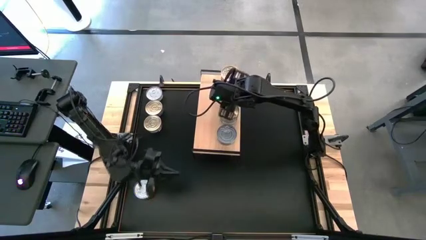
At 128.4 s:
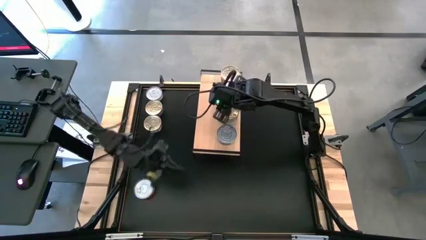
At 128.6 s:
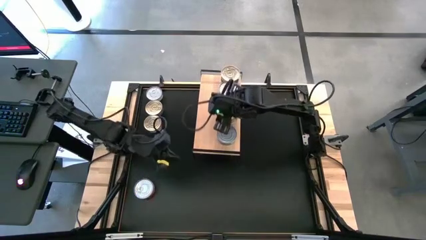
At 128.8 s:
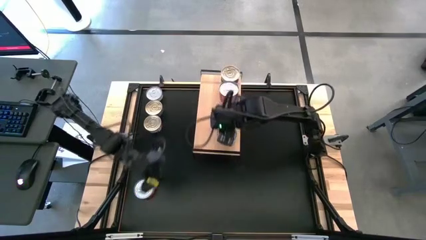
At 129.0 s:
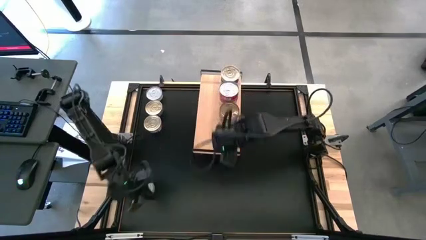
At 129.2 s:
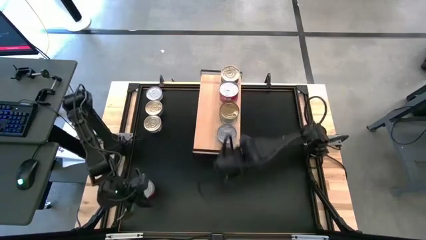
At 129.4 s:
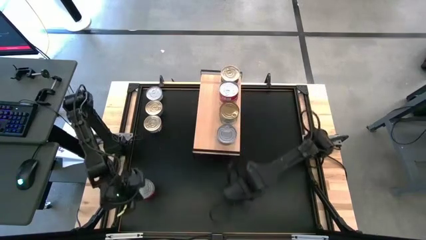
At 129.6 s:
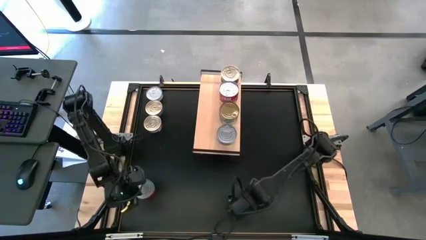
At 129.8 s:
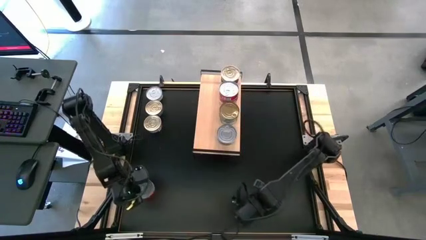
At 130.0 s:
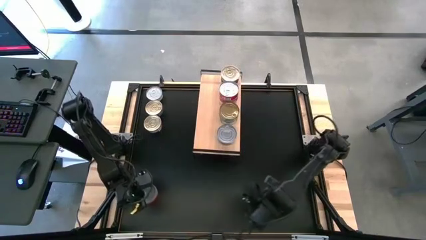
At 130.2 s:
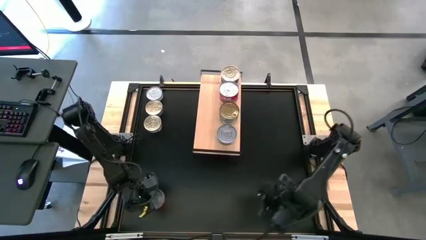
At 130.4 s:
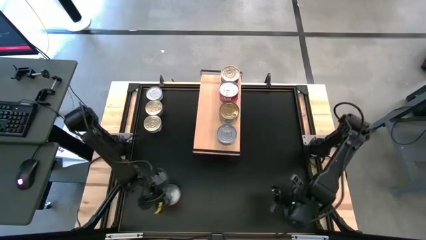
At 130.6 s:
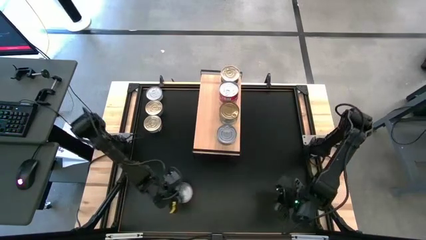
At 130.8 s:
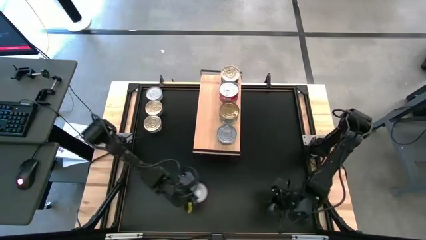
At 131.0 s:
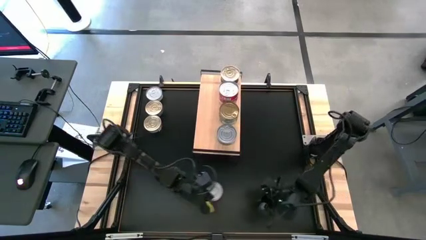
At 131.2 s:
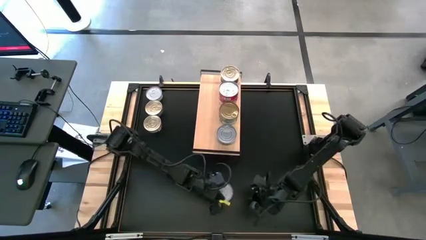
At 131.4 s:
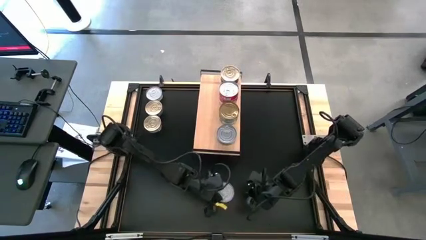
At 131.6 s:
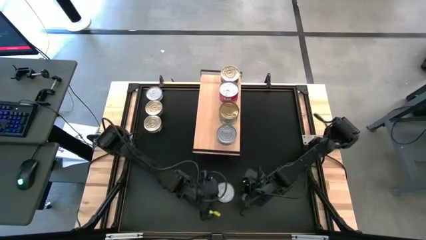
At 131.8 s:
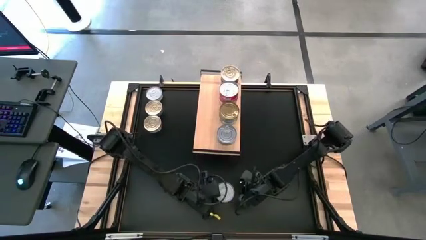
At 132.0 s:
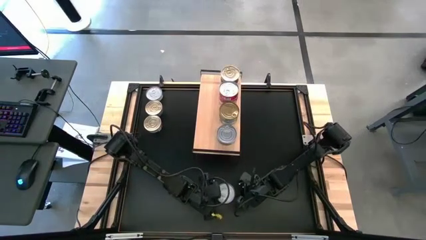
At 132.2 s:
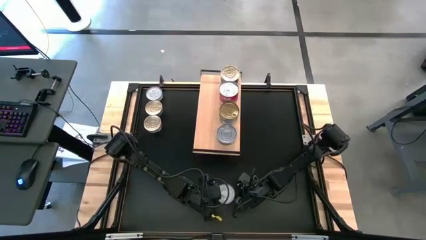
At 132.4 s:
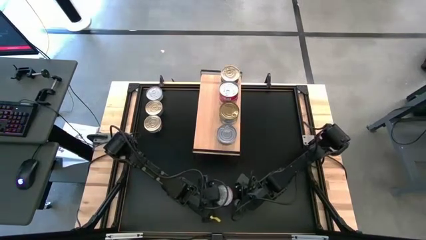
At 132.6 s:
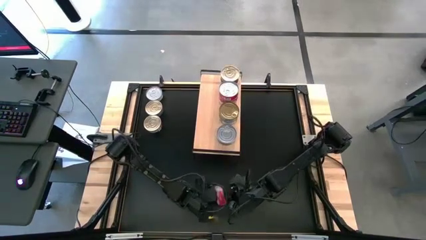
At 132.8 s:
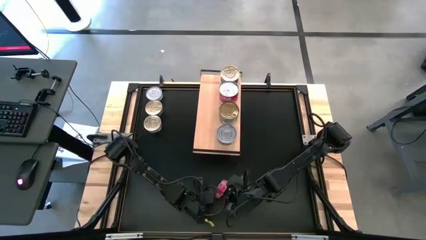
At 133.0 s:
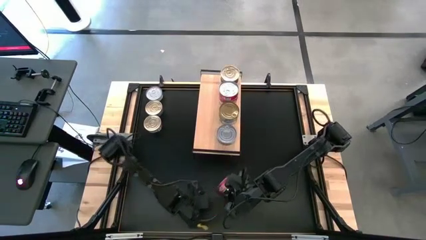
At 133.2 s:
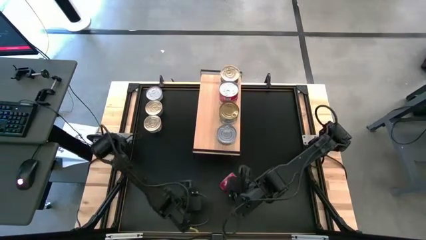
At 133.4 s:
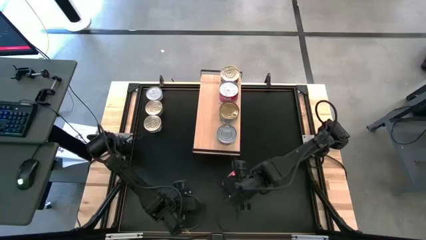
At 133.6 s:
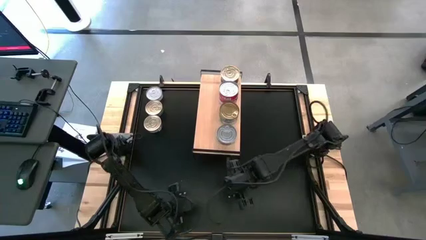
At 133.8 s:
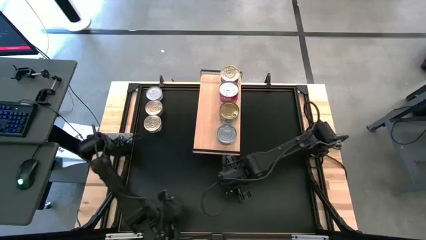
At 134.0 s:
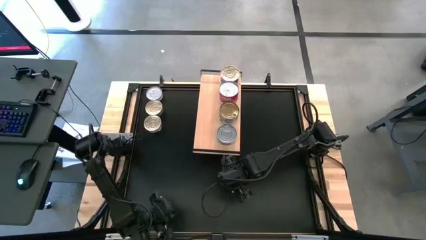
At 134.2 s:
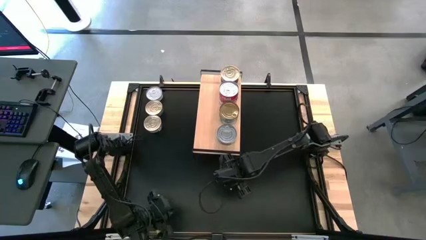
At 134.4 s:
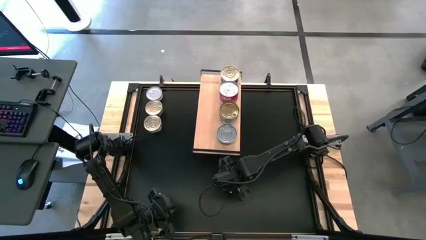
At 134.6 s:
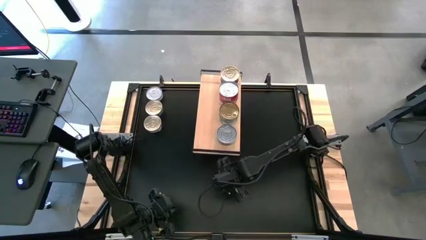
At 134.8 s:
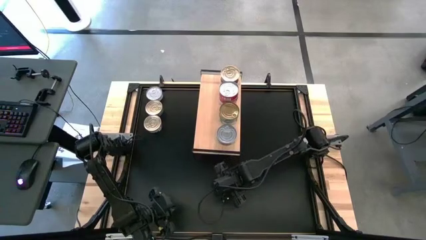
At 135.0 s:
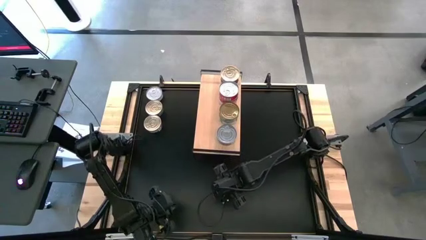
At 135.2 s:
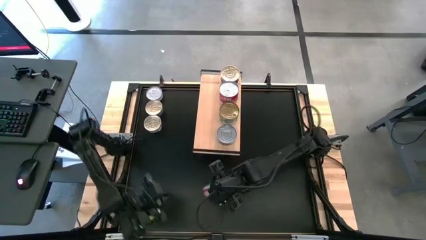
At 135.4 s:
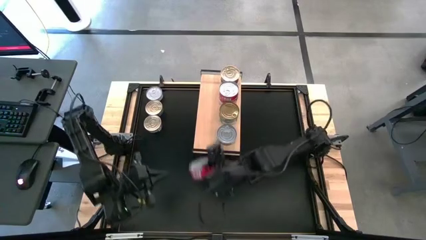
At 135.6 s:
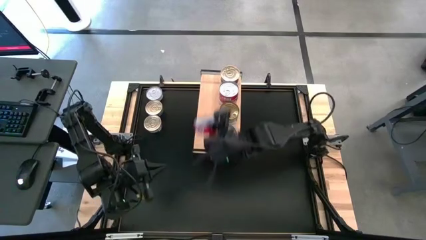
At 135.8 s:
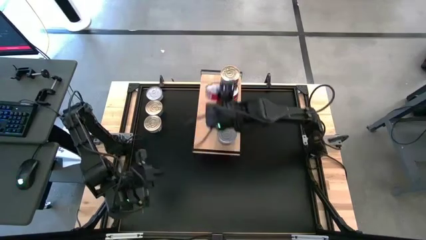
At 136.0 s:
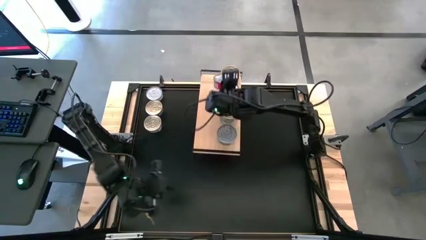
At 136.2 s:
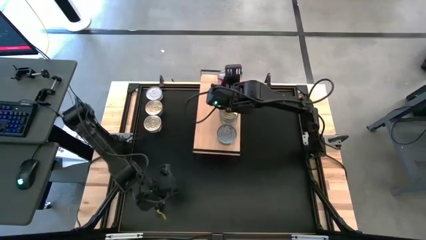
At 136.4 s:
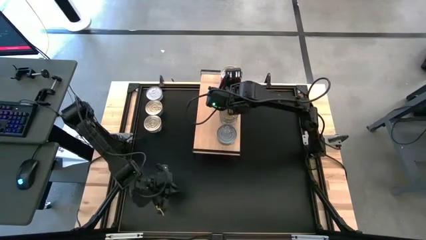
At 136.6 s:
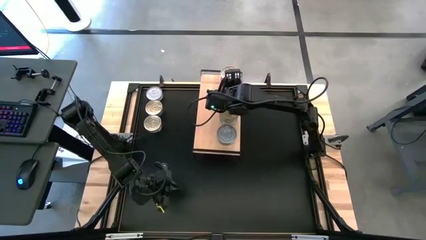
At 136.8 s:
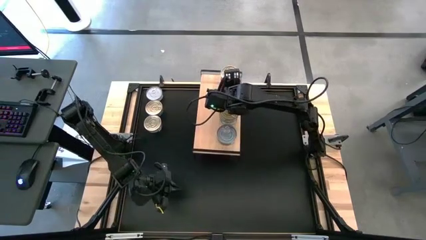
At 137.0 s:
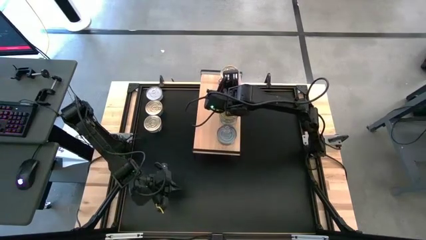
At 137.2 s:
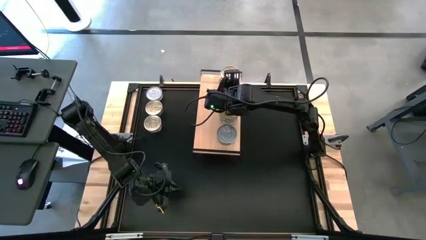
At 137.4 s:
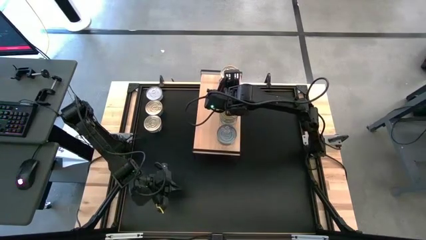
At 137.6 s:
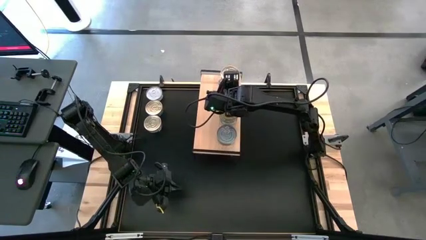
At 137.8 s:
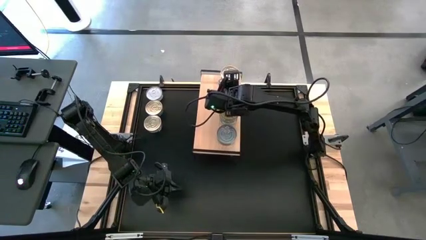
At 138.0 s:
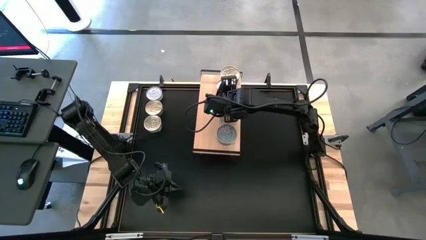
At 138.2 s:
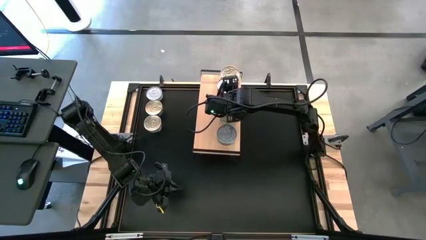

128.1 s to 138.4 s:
Task: Stack canned seafood by type on shelf
Stack the red tuna can on top of the red tuna can on the shelf

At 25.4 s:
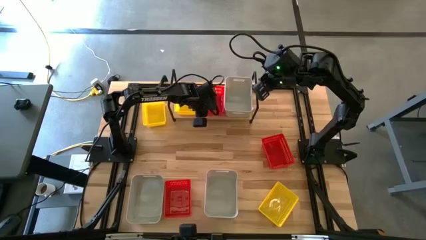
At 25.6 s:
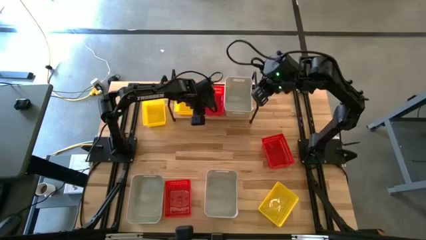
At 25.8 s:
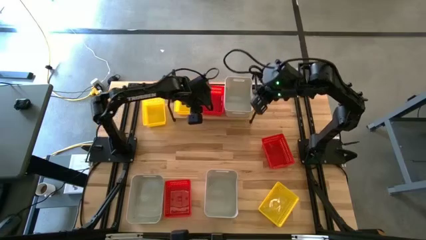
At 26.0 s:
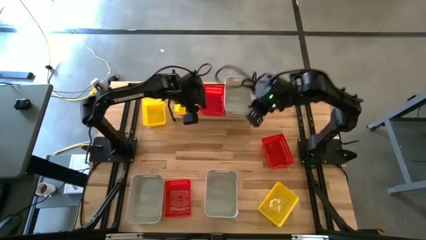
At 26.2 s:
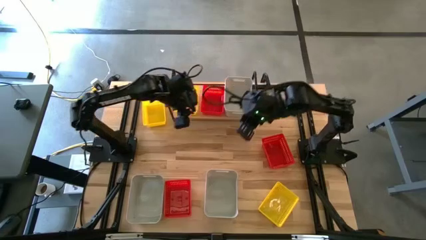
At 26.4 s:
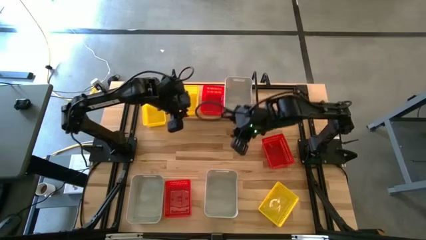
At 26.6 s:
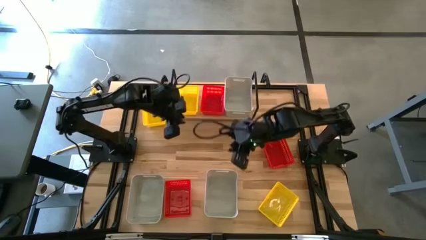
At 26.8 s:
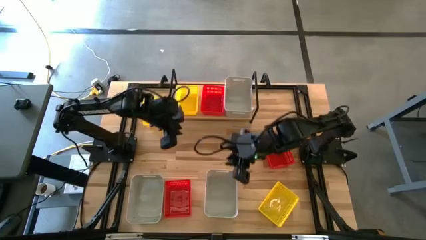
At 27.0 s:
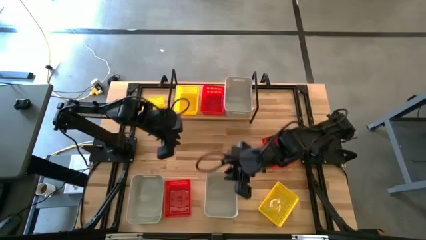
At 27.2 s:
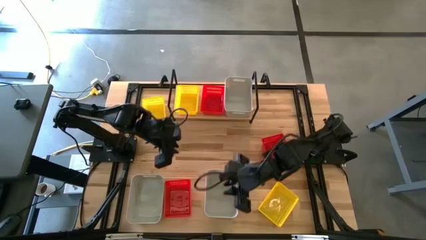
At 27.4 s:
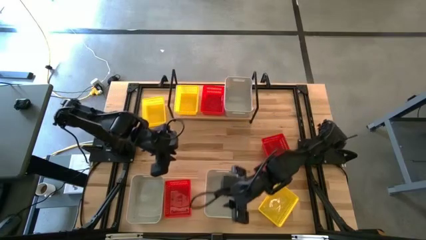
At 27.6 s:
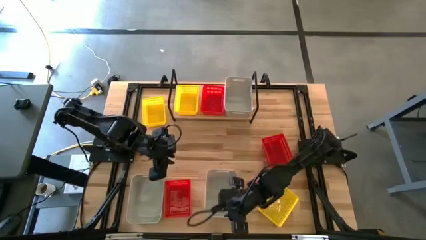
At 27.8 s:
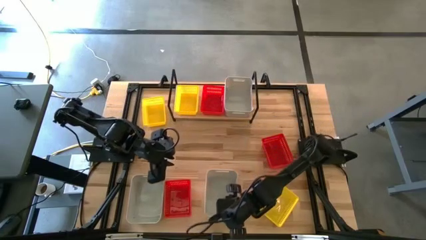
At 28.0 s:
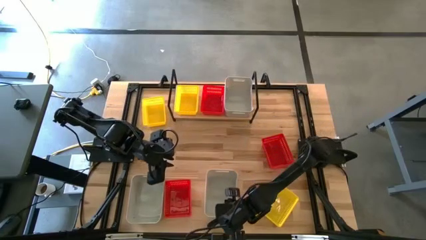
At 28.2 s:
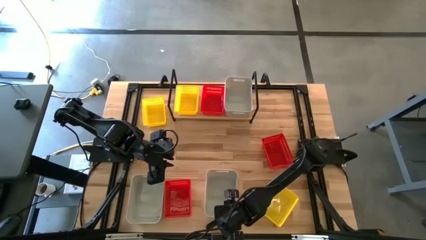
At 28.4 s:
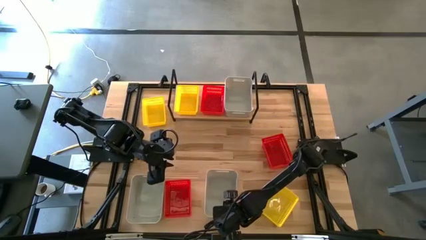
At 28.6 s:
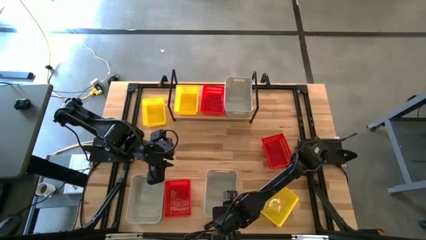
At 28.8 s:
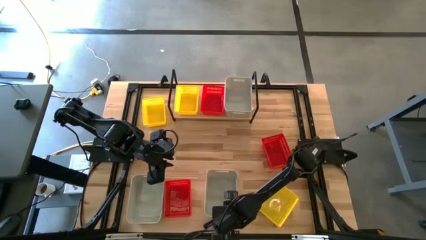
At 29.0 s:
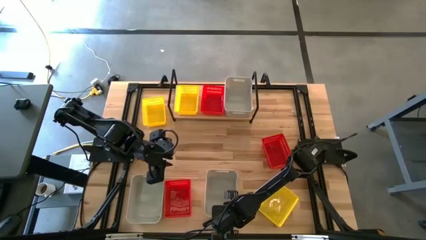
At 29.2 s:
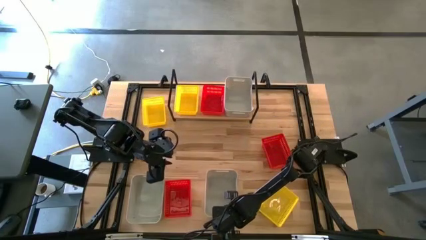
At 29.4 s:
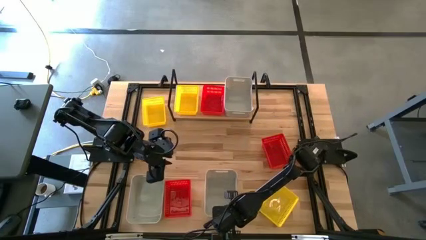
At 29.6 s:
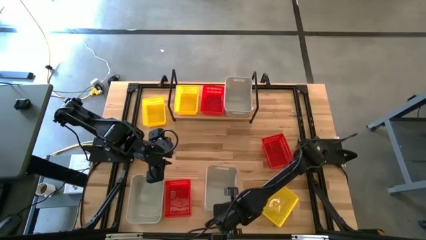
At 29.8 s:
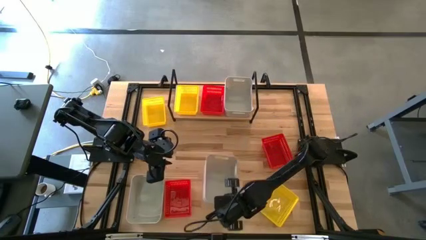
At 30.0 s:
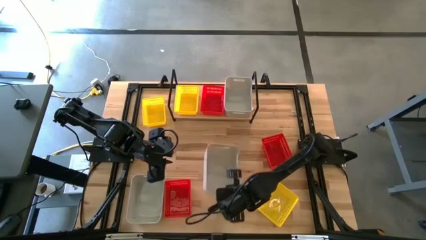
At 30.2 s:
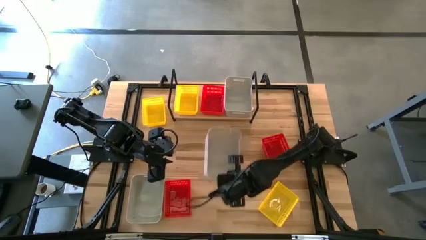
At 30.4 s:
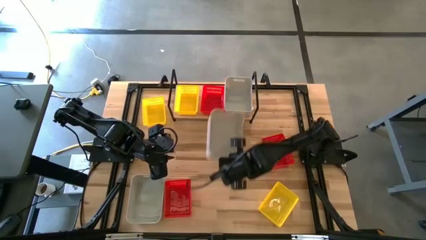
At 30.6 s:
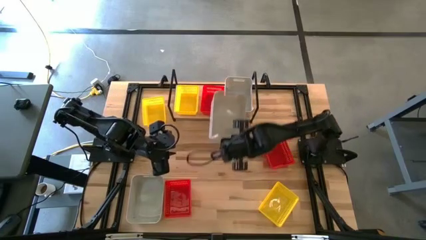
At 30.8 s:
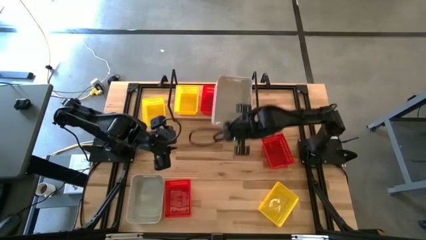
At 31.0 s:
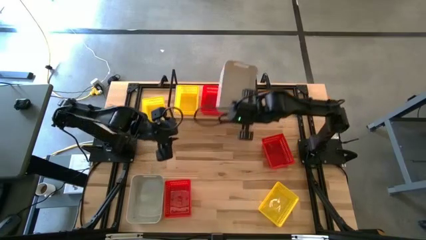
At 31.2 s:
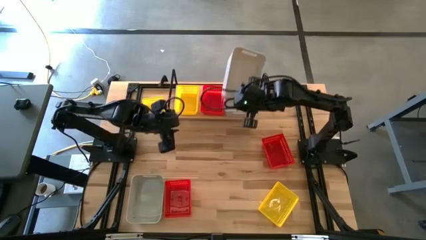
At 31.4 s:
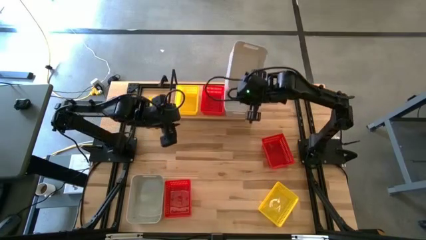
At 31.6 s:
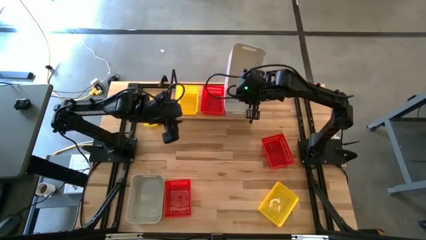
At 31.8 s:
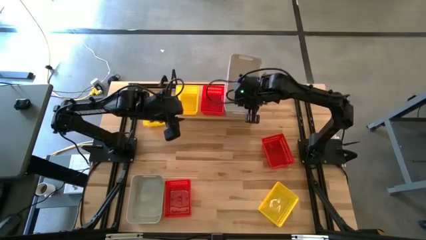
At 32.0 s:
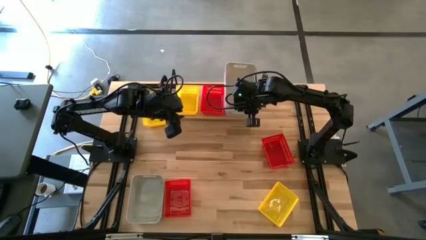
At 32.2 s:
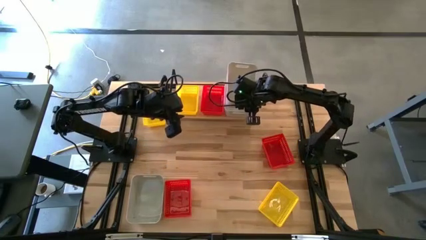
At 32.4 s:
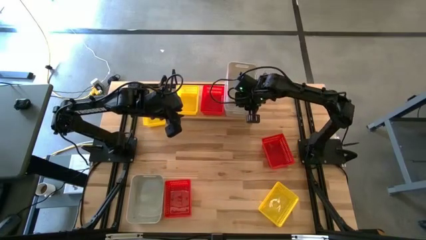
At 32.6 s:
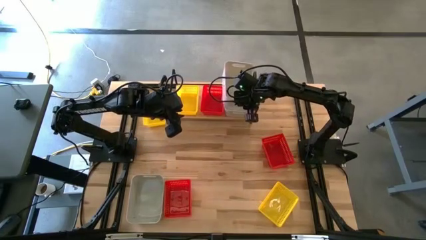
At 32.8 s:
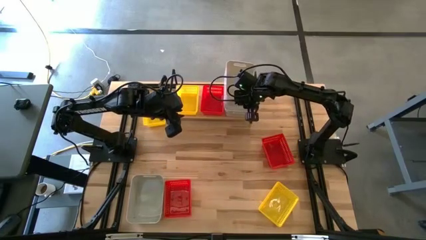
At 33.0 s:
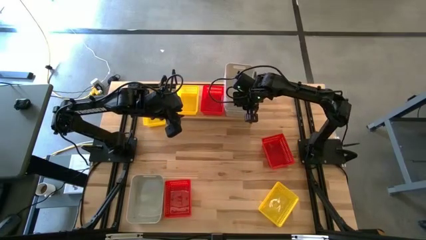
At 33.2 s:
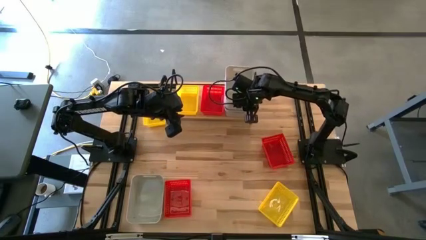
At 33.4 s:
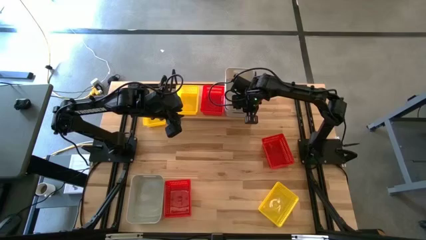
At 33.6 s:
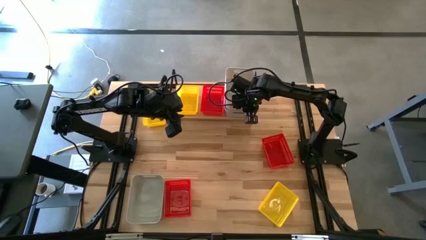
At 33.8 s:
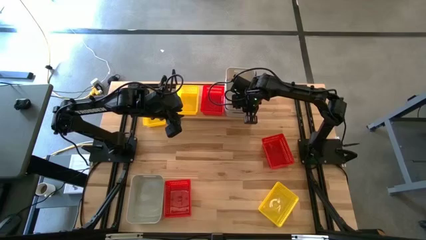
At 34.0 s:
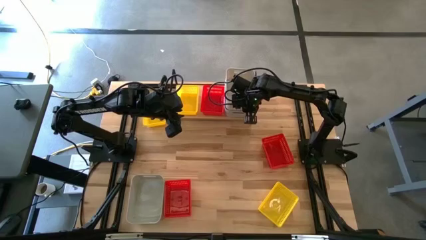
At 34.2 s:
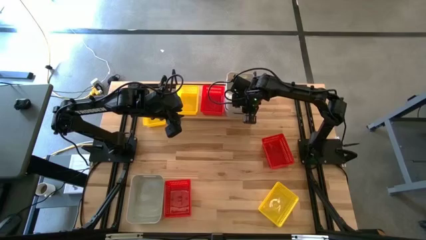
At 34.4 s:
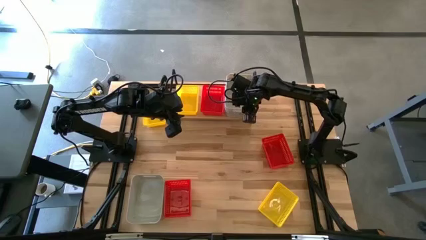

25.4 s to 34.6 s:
Task: Stack baskets on shelf by color
Stack the right white bin on top of the white bin on the shelf
